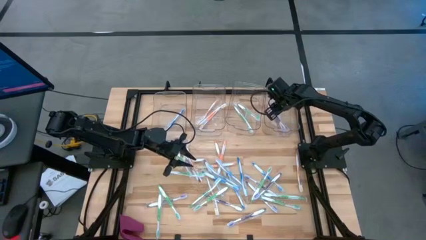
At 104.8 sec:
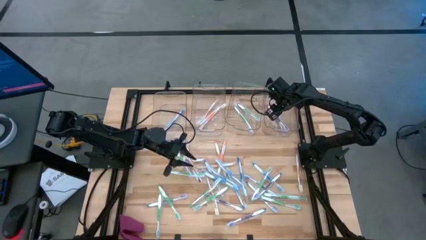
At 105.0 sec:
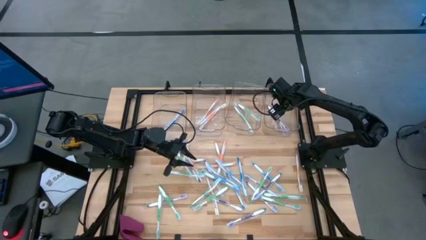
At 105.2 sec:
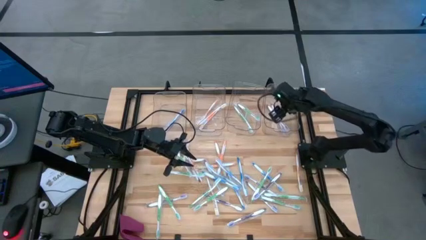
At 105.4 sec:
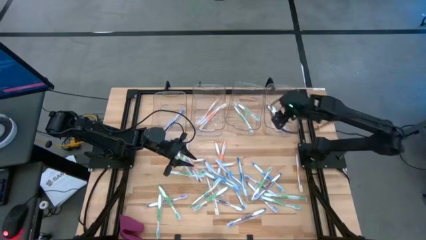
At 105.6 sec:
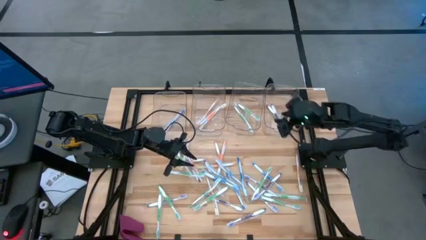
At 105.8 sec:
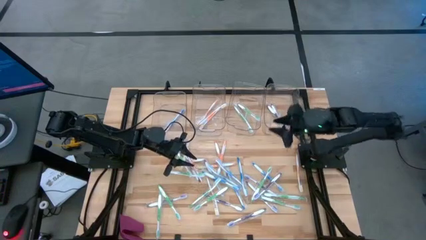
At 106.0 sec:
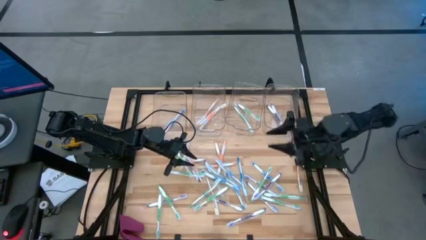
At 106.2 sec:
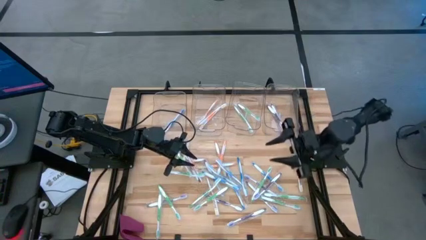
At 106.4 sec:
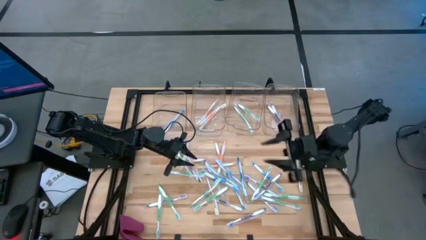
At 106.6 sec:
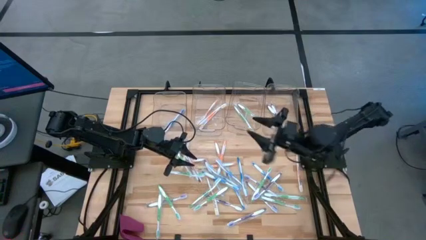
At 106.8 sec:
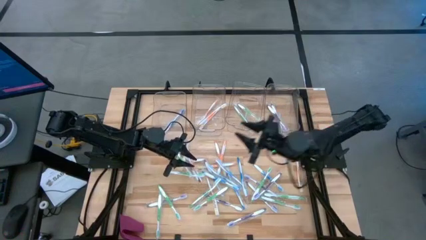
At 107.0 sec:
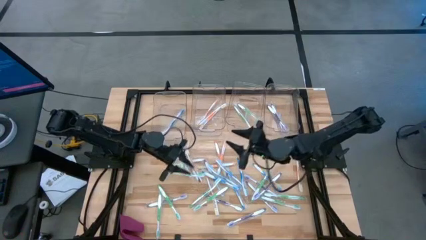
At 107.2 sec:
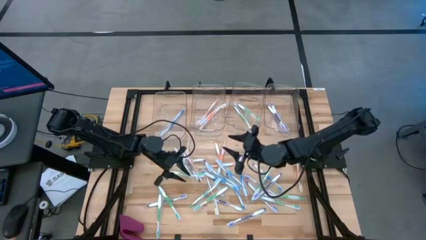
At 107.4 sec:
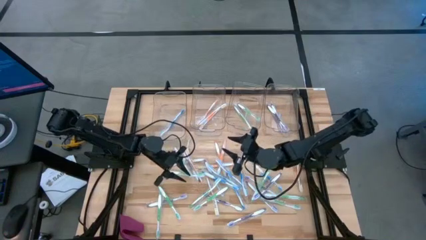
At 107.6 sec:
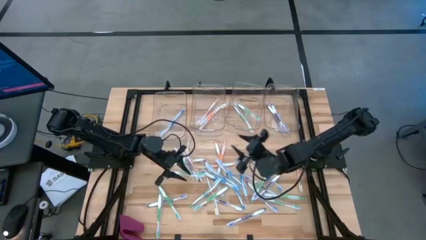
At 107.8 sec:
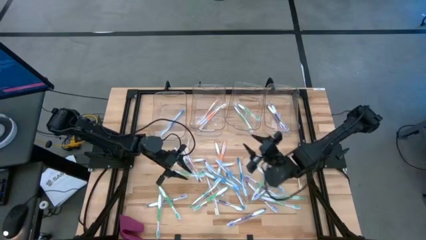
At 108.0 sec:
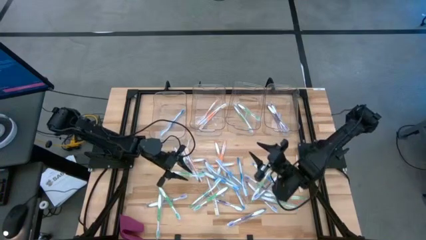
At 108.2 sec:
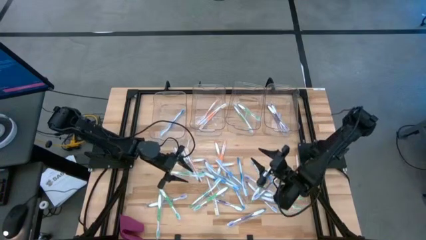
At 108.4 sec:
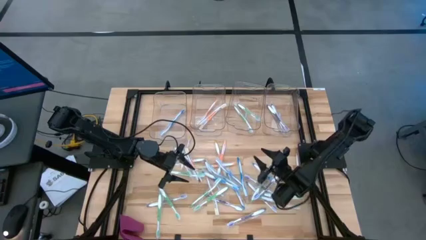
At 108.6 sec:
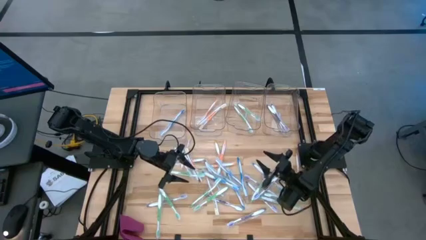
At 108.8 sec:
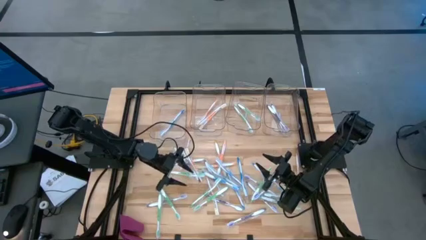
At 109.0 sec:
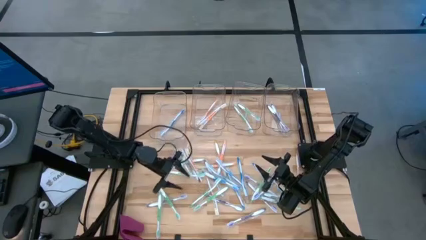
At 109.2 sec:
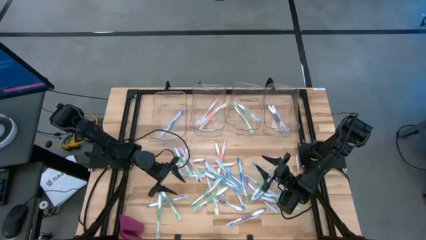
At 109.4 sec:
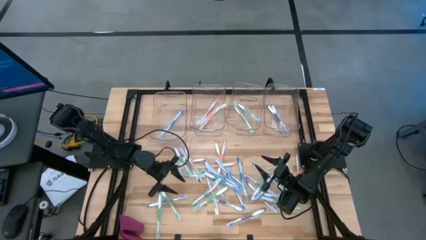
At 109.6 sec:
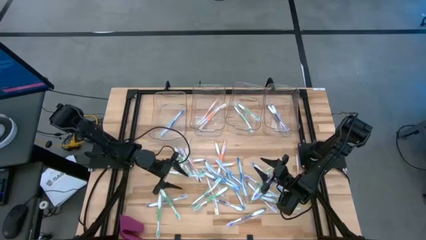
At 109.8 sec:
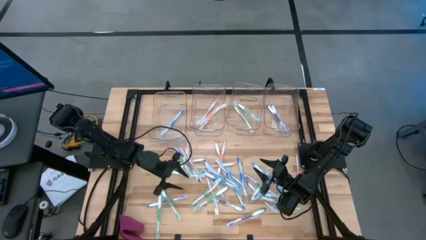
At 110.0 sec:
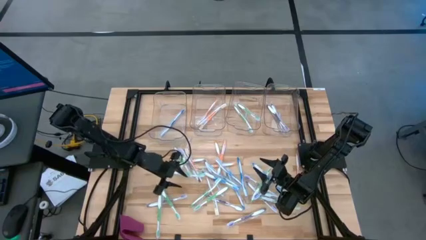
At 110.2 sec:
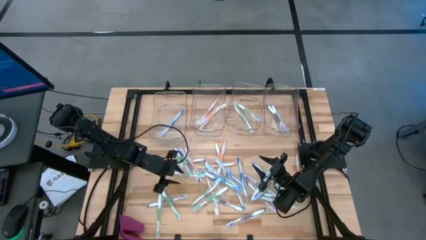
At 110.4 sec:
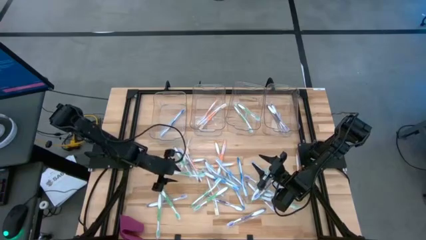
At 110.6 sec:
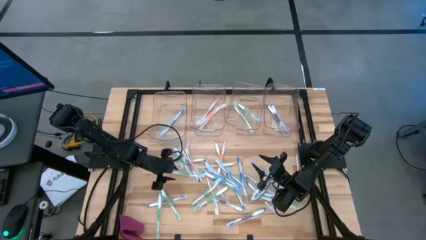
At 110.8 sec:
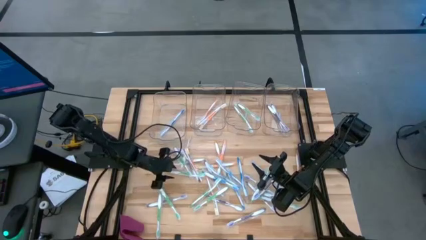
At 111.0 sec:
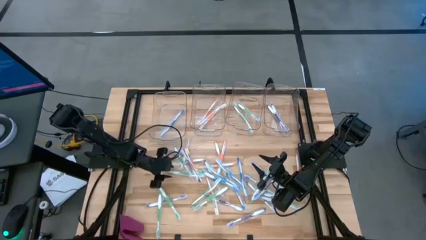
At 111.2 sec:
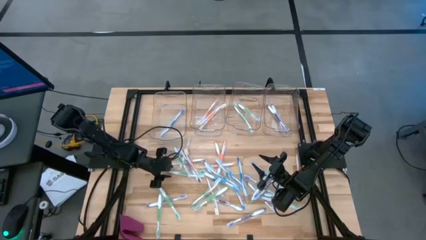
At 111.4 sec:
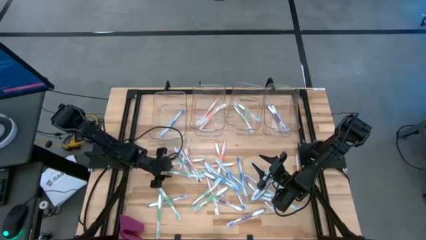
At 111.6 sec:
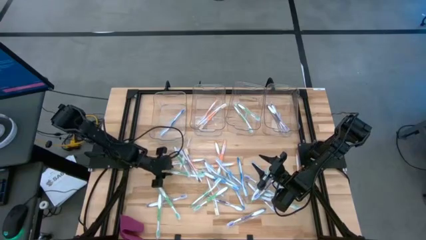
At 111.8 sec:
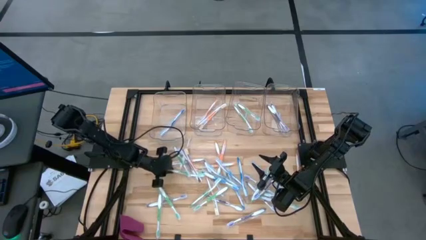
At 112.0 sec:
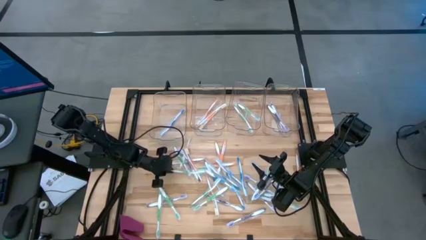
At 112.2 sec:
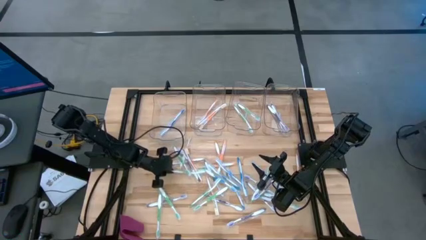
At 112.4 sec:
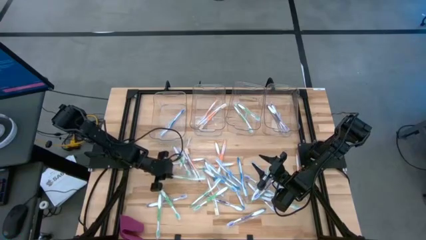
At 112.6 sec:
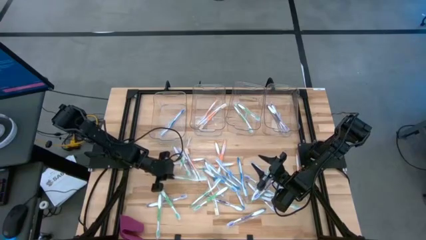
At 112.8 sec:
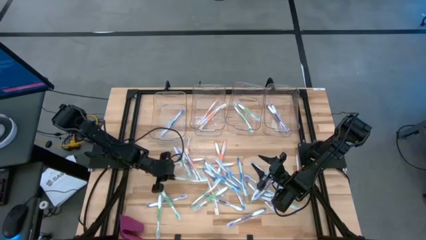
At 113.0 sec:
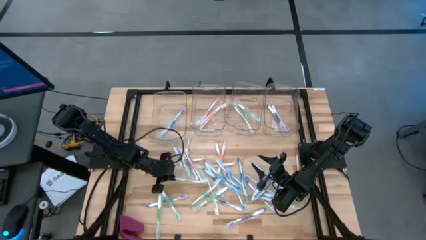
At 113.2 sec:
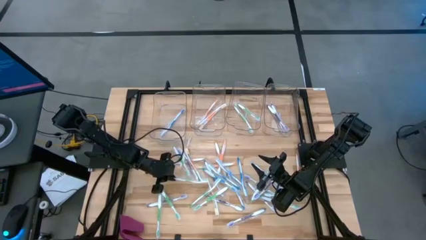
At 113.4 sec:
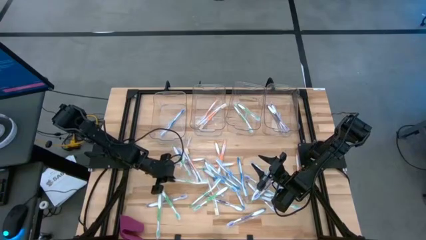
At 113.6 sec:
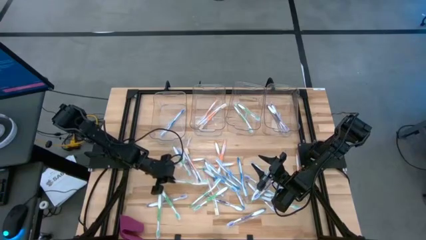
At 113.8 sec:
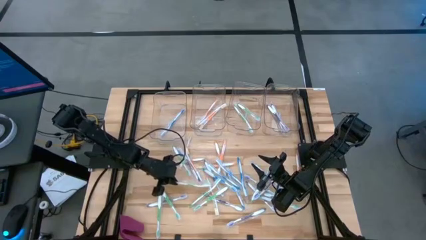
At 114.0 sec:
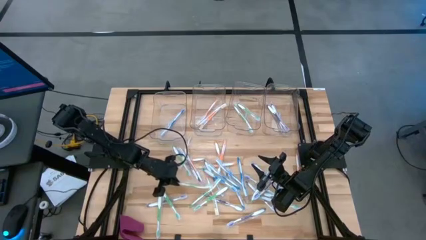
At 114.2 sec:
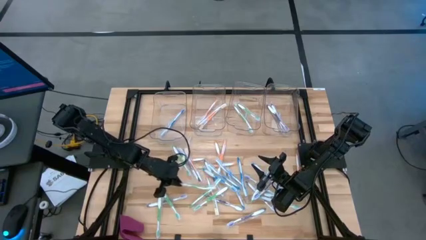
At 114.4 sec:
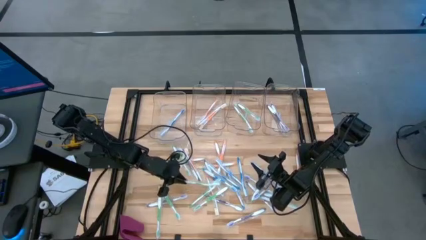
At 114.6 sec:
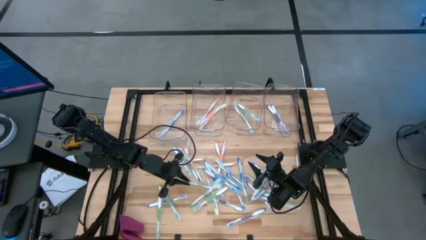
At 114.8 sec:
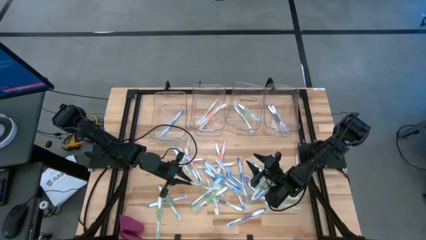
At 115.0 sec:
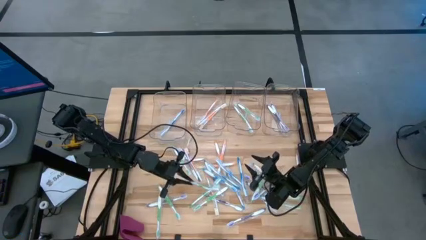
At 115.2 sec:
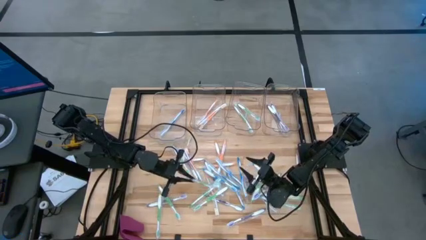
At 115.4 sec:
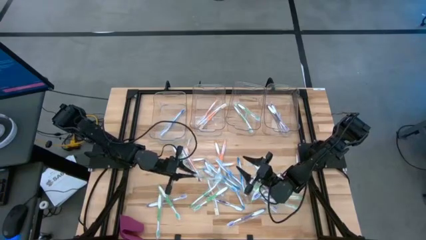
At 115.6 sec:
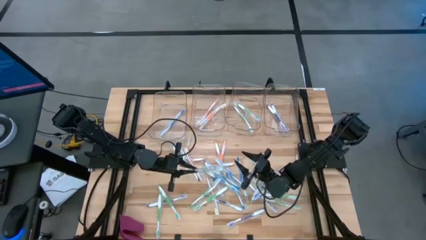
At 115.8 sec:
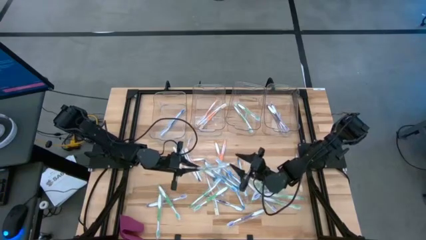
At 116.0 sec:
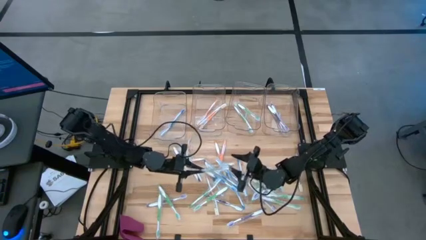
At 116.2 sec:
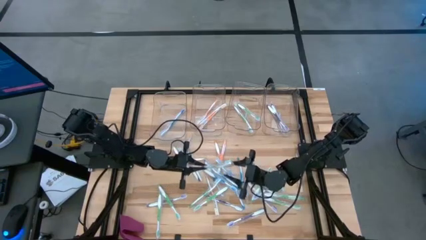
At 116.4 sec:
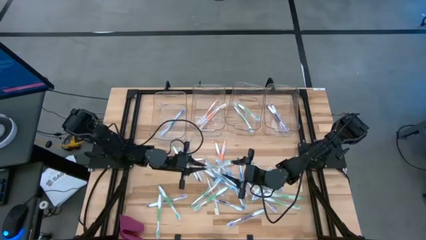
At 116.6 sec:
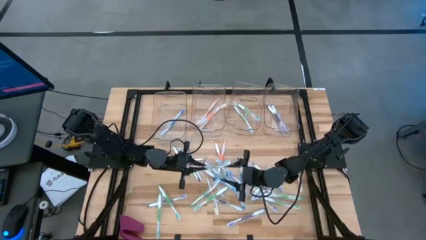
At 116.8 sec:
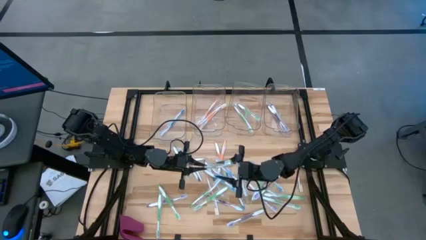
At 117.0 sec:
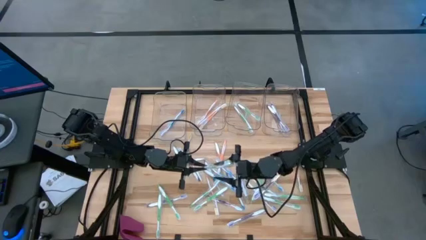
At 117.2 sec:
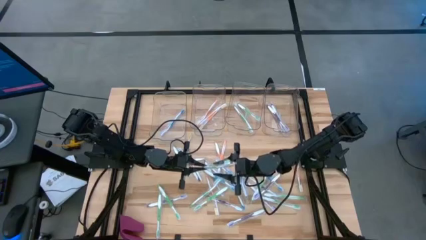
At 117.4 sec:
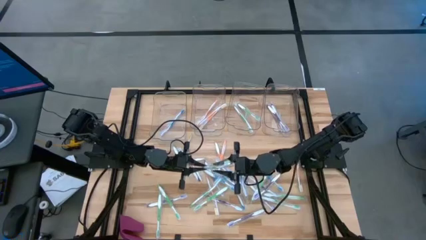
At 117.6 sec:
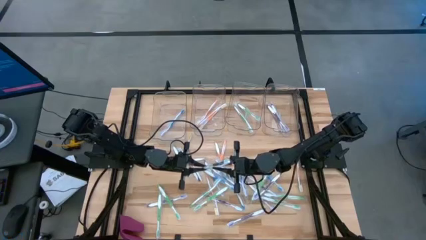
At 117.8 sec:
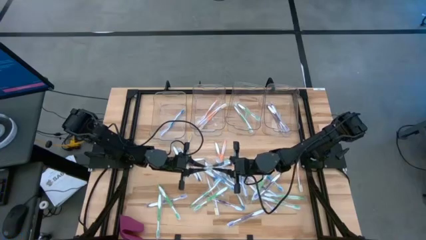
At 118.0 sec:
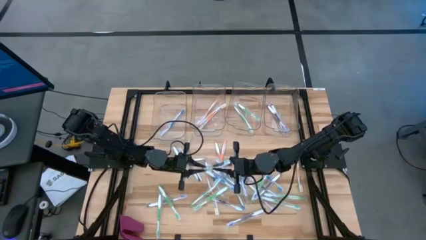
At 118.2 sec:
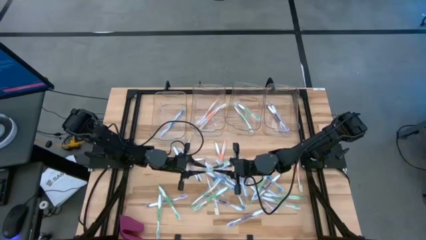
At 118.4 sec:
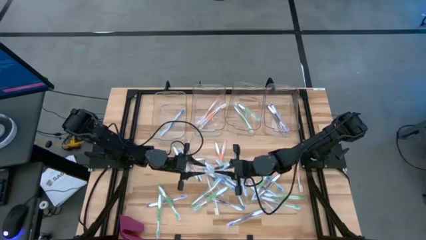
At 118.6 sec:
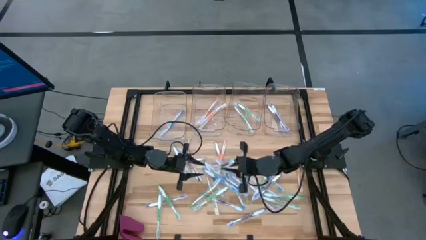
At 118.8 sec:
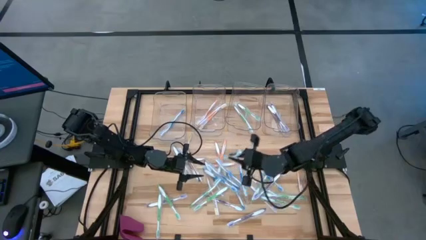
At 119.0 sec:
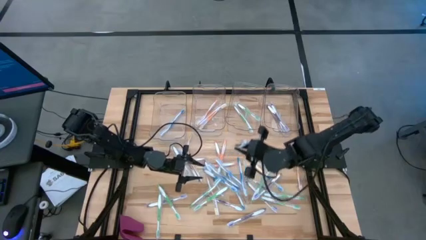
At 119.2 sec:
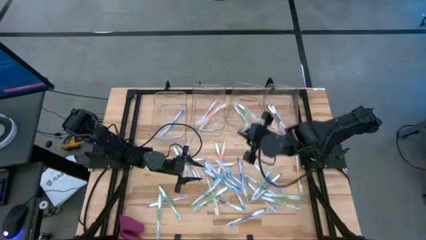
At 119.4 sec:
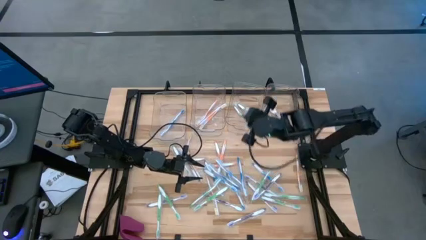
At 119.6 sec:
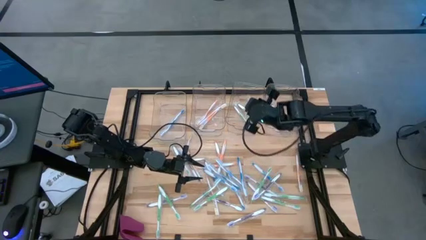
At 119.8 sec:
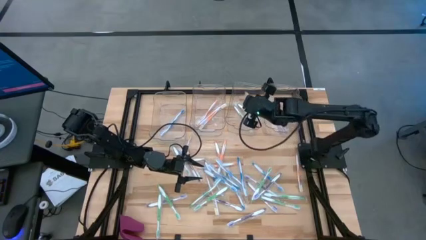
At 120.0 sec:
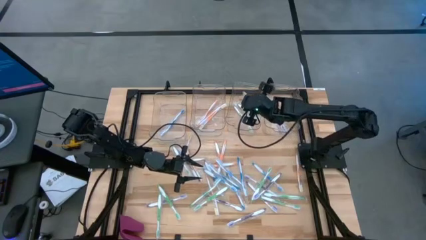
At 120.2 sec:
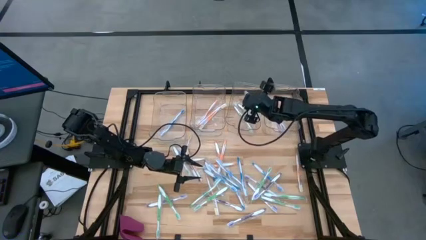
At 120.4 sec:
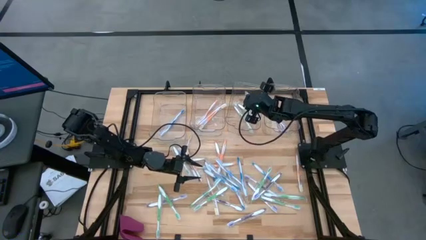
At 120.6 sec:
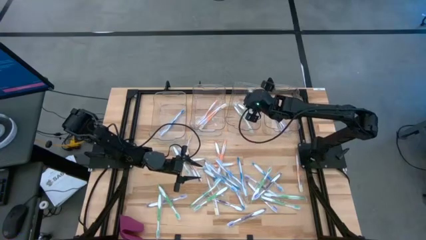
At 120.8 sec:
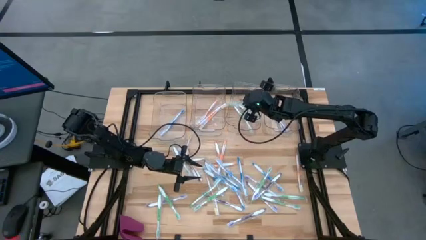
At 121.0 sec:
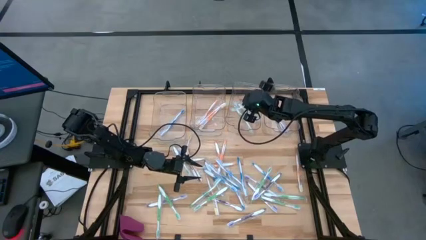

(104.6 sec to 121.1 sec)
Task: Pick & Place Toothbrushes
Put the green toothbrush into the middle right transparent bin
